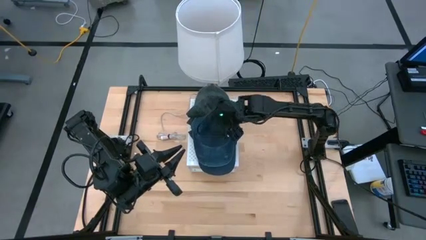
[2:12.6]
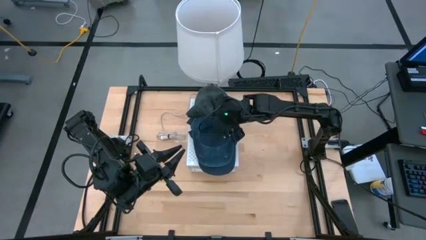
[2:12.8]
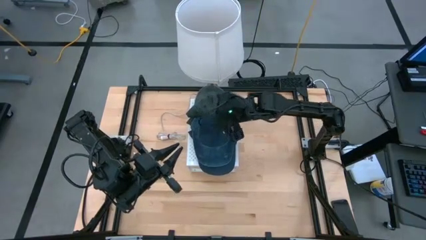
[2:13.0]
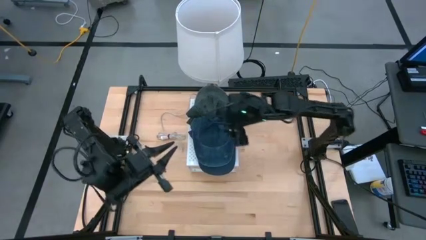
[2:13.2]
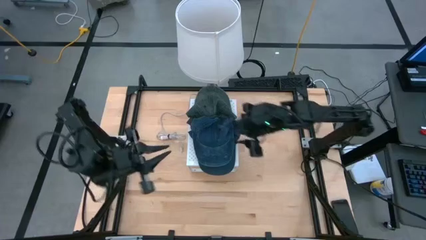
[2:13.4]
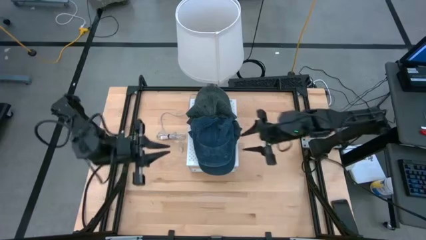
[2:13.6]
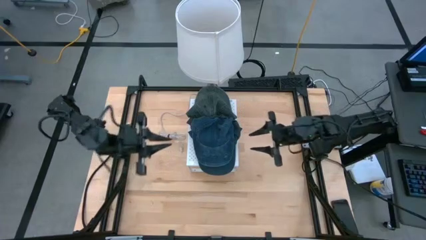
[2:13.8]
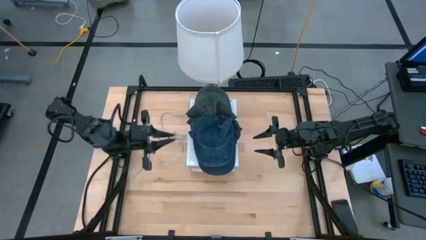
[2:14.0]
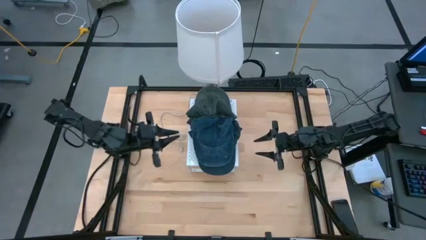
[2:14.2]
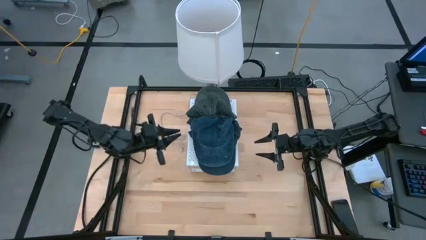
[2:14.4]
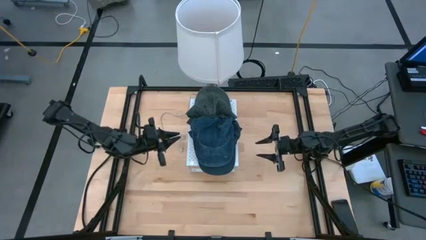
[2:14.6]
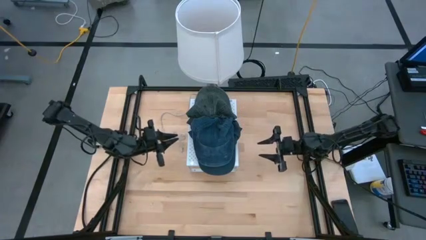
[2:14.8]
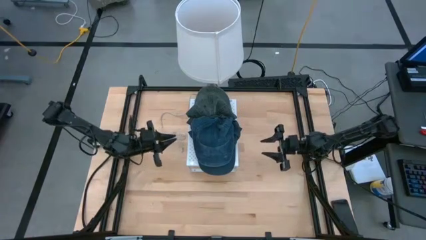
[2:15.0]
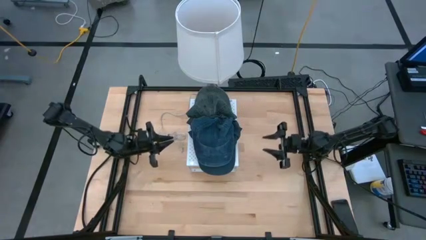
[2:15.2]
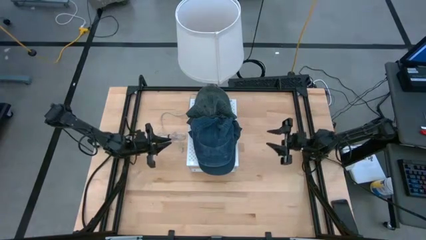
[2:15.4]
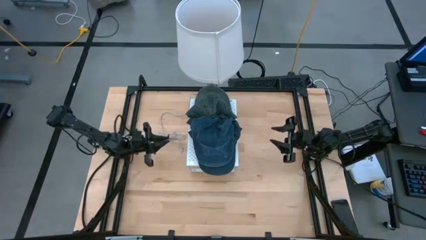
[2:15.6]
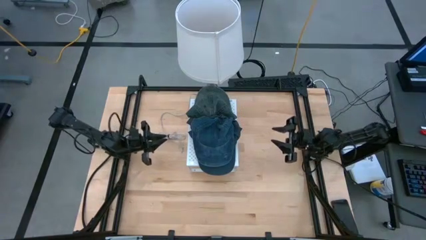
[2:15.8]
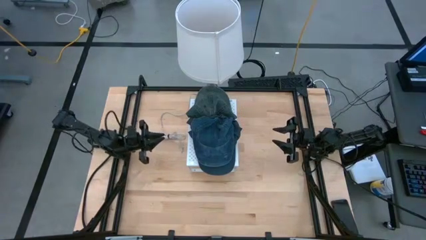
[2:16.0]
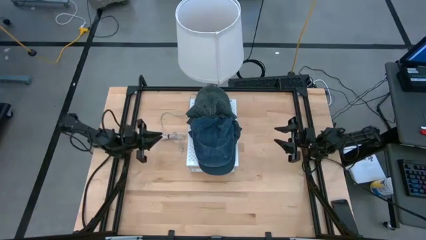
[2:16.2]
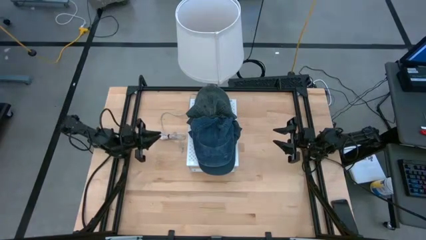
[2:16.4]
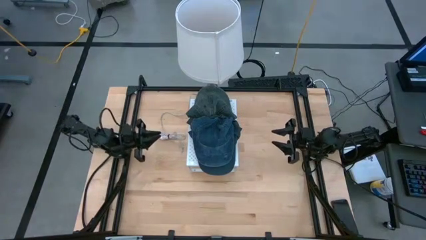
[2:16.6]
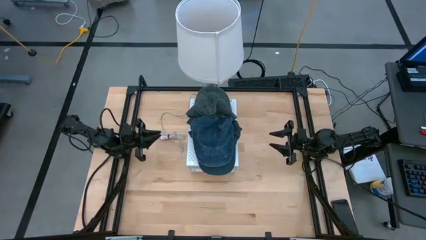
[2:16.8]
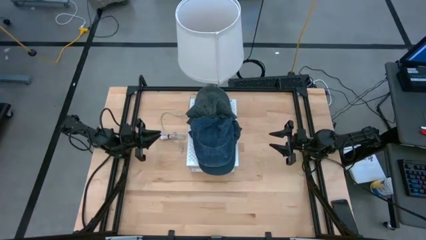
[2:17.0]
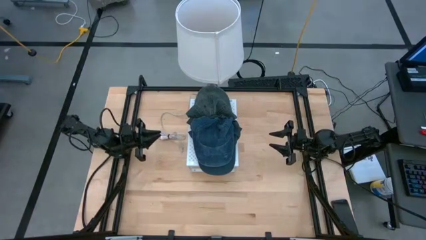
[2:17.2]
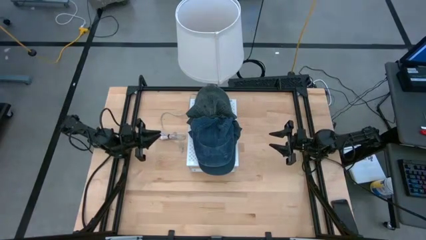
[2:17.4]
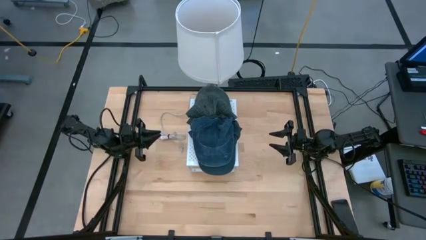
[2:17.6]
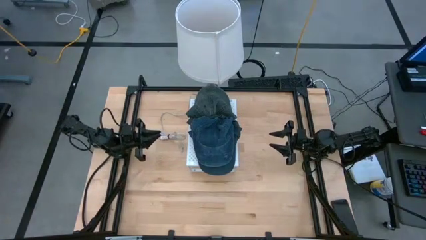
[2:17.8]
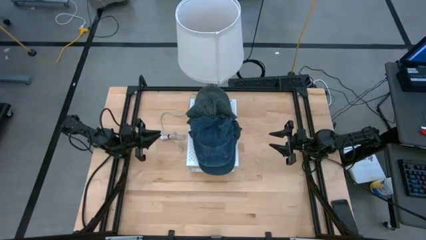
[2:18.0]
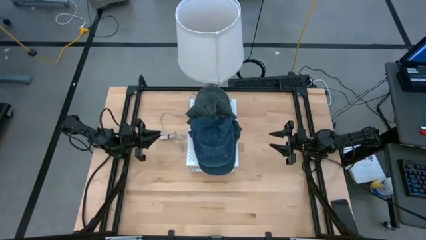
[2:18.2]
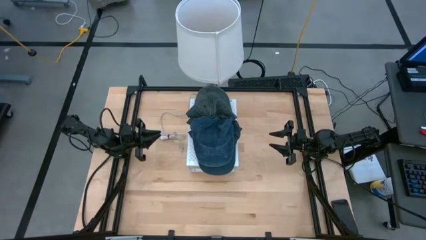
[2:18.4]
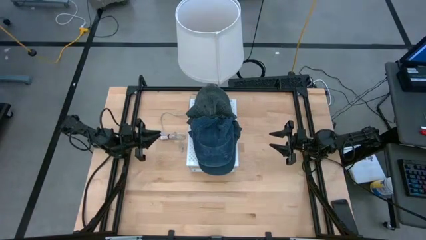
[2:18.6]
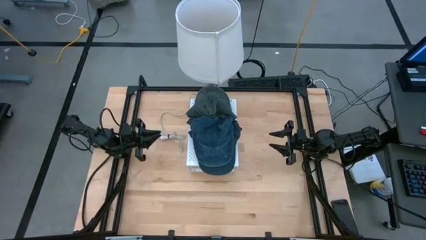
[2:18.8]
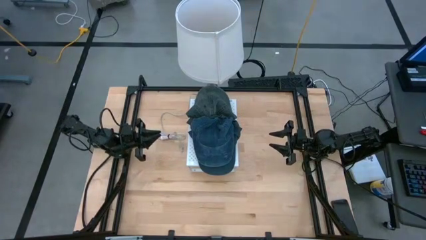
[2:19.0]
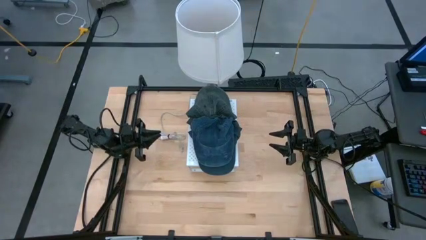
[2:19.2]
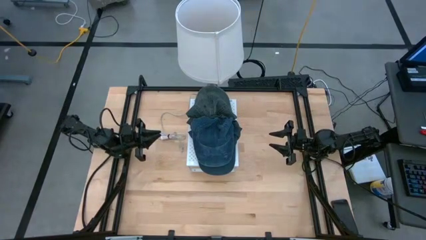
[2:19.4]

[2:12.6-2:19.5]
Task: Pick & Place hat
Return to Home Position

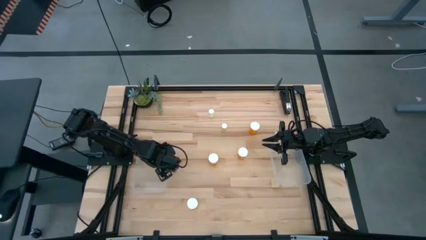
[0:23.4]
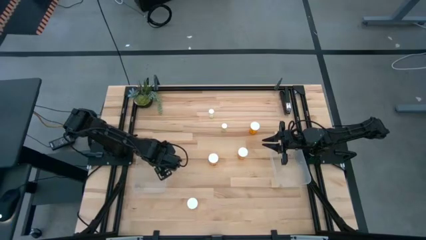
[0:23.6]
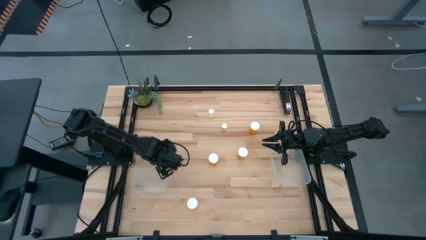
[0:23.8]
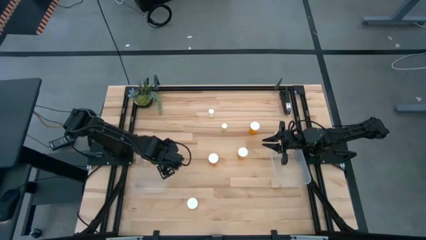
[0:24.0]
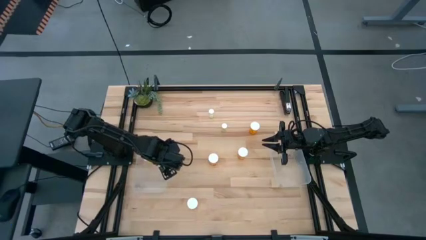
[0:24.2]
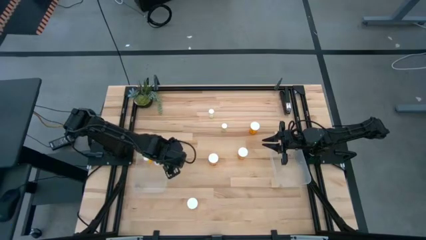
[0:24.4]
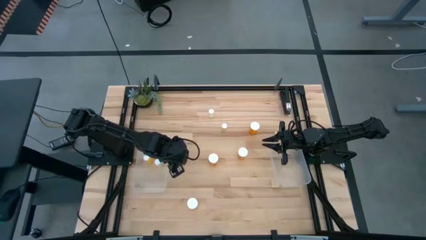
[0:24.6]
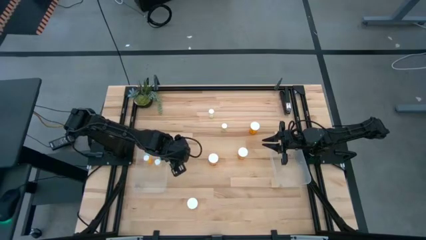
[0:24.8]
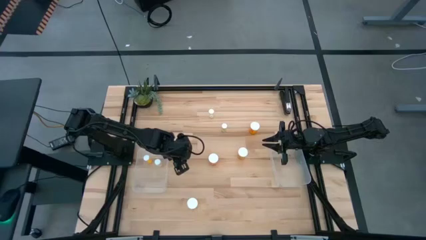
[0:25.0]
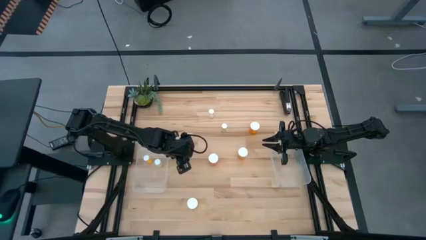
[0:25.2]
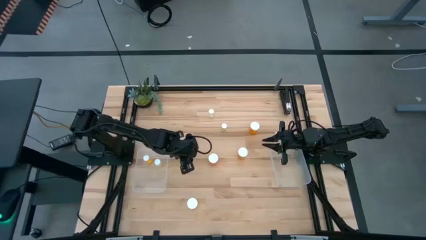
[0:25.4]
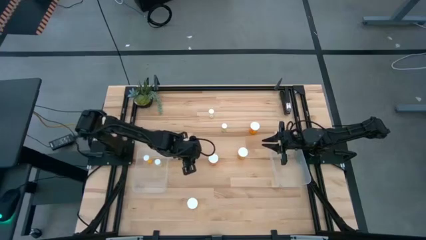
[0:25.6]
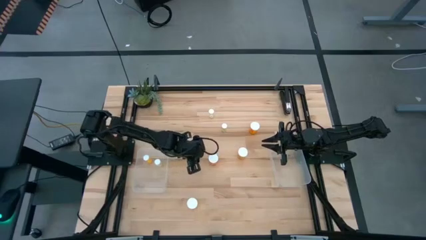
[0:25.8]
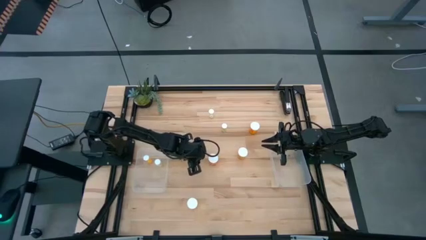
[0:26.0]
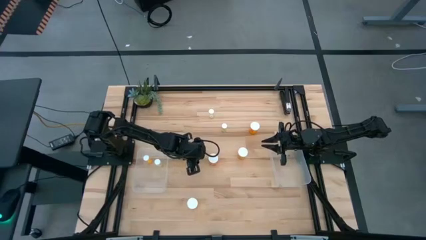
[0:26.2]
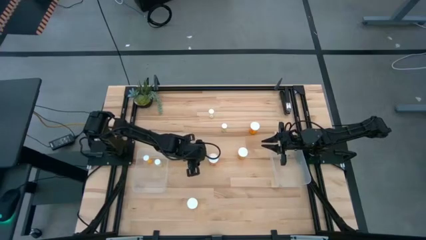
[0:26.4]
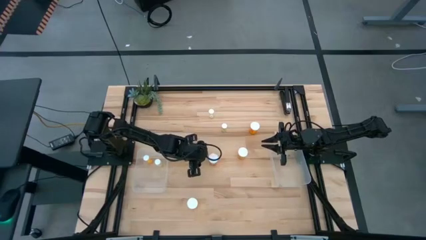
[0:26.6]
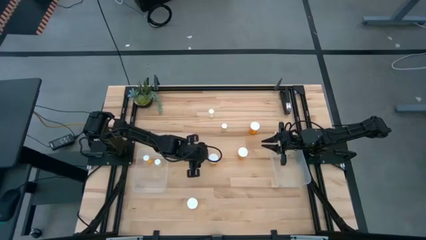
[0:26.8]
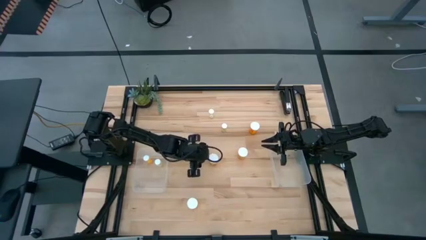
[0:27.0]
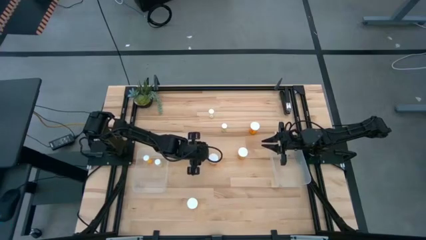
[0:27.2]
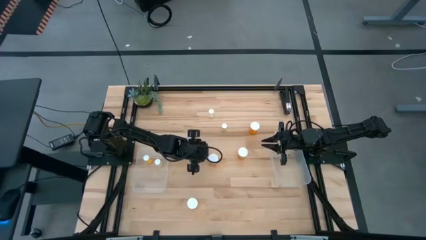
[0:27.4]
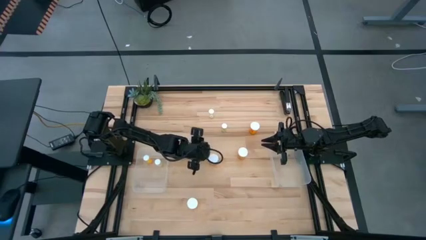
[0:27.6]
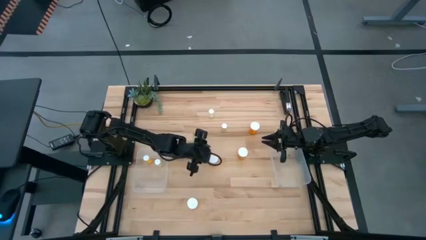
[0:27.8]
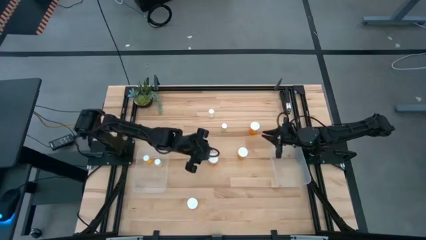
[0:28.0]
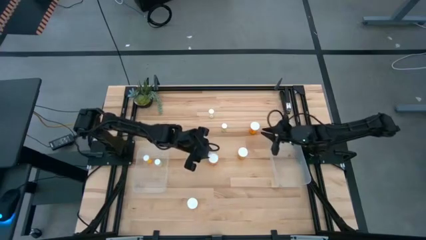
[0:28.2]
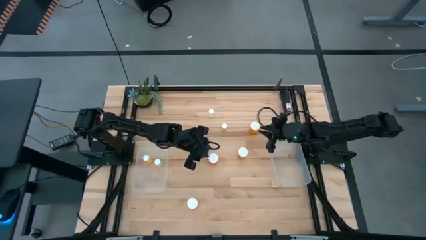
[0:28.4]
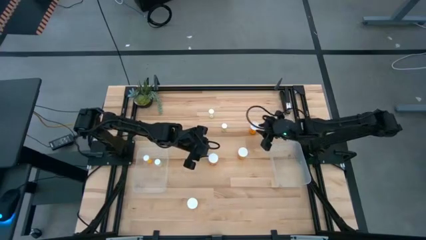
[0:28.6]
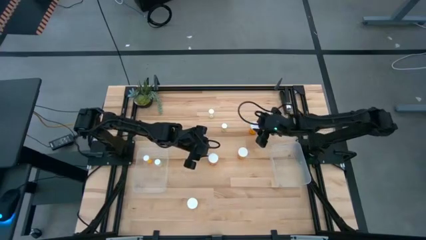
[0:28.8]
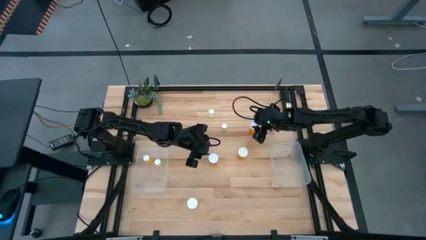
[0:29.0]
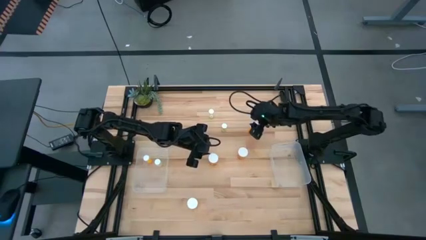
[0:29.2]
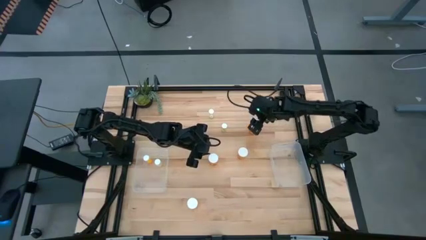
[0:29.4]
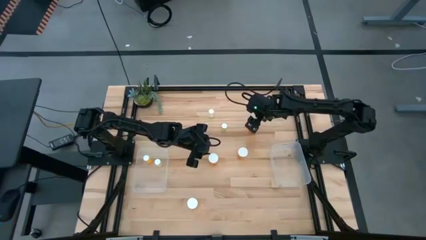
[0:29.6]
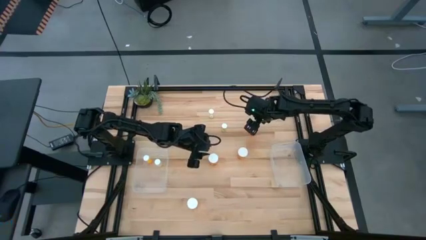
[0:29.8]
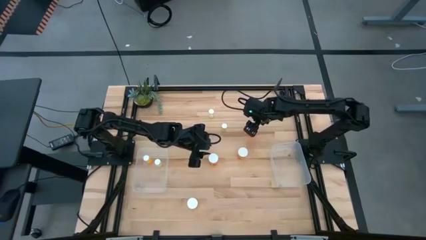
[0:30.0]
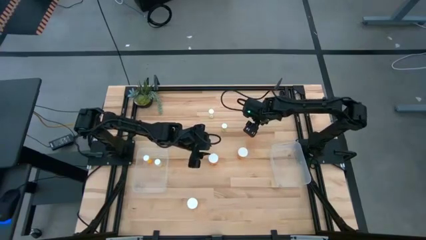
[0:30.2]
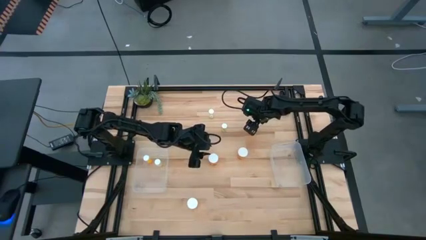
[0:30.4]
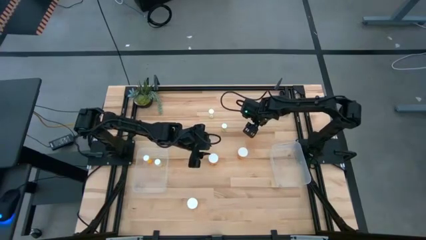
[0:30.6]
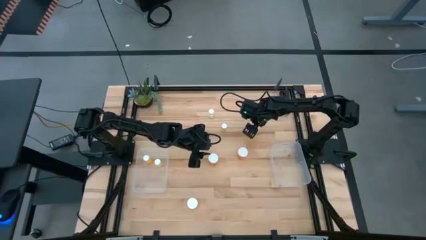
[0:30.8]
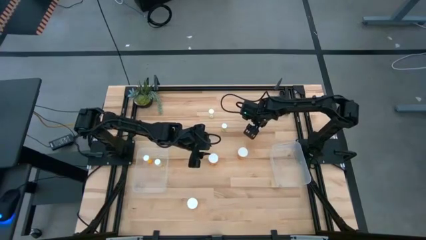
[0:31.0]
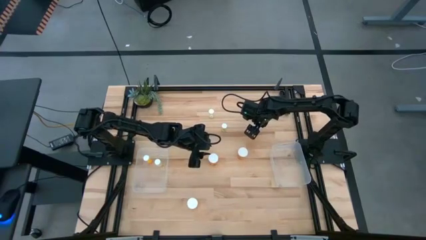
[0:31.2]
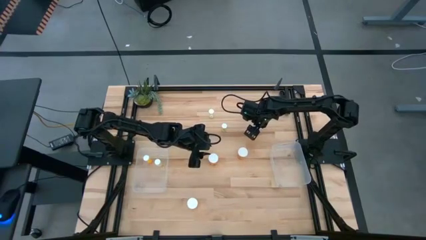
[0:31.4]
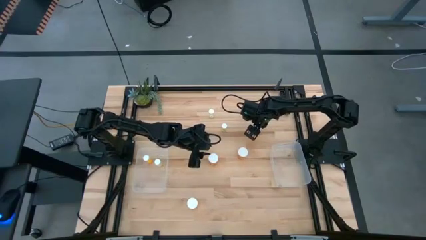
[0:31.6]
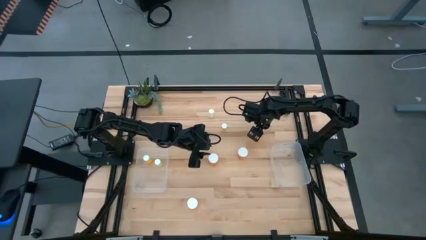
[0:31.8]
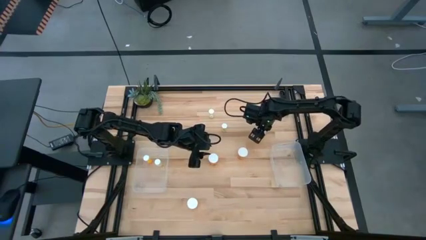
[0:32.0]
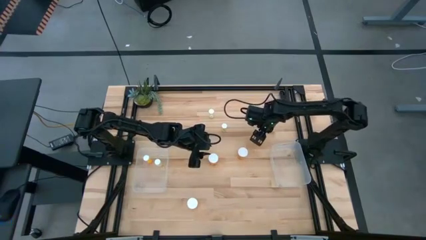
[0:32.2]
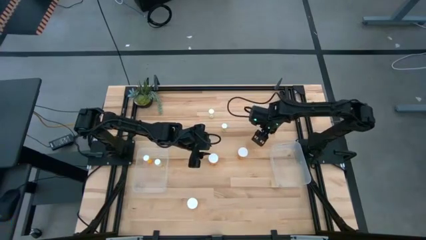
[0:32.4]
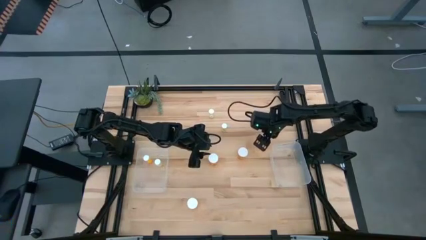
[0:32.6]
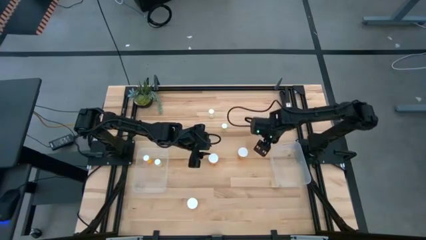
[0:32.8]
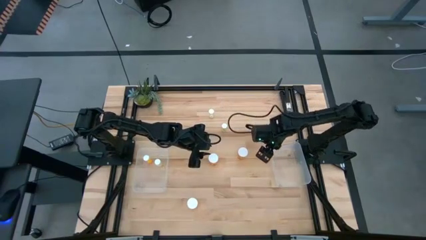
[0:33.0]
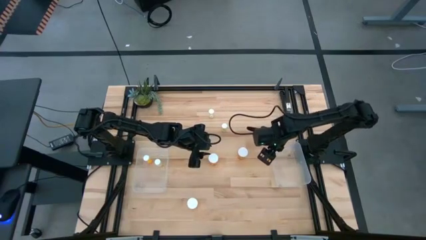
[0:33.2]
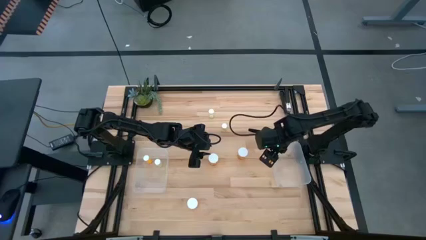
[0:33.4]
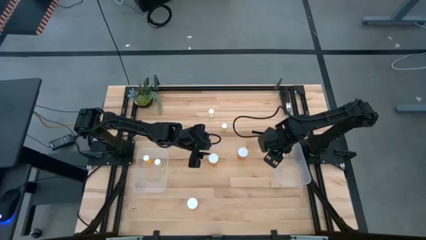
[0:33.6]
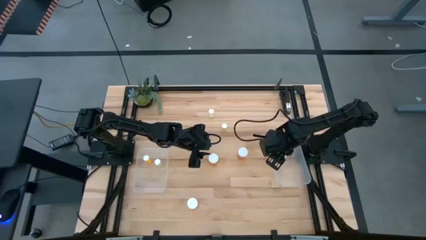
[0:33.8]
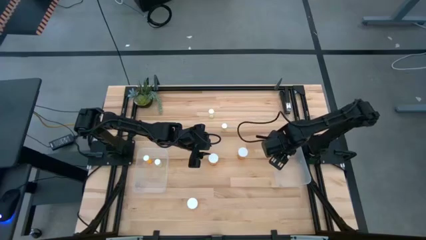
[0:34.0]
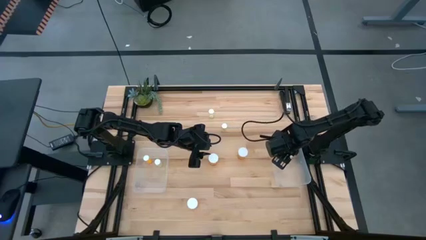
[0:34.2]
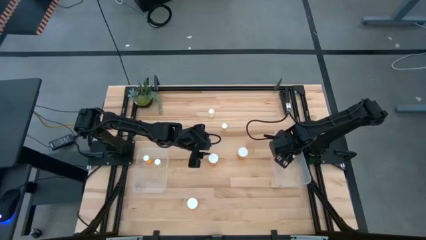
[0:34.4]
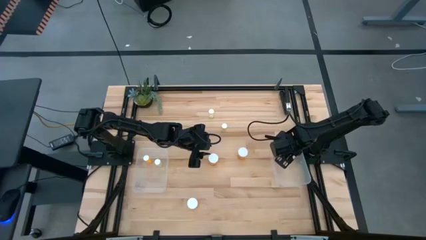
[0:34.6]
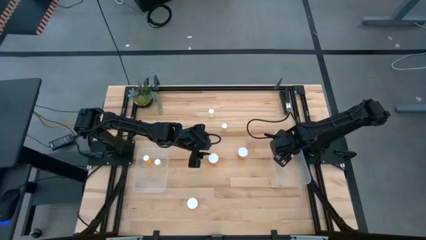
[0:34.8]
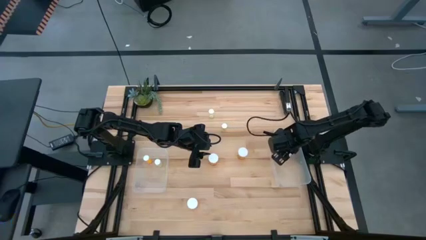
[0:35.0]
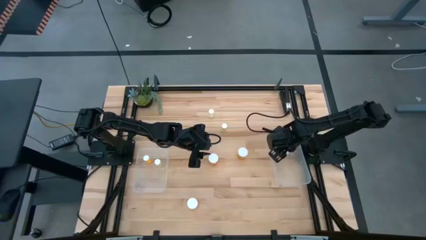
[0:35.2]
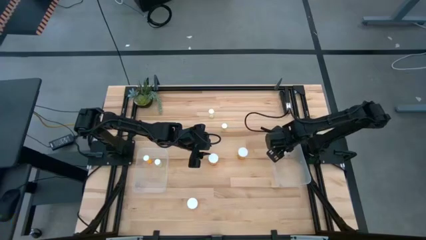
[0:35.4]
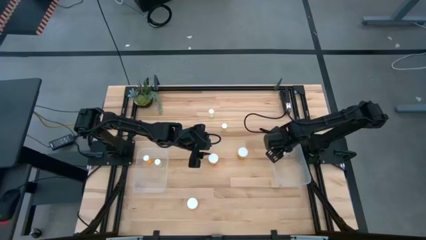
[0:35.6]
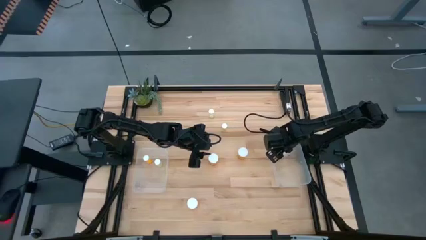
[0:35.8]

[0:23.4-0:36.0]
Task: Pick and place medicine bottles into bin by pill shape (circle, oval)
Put the big top right yellow pill bottle into the right transparent bin
